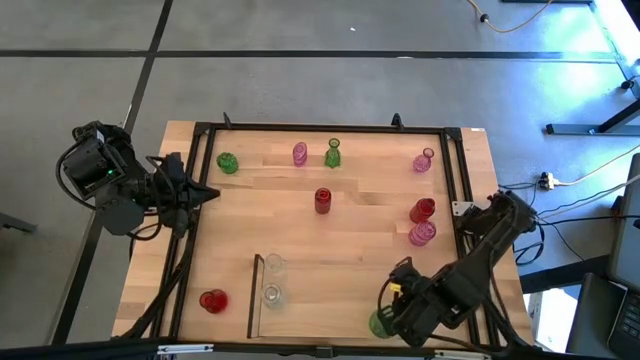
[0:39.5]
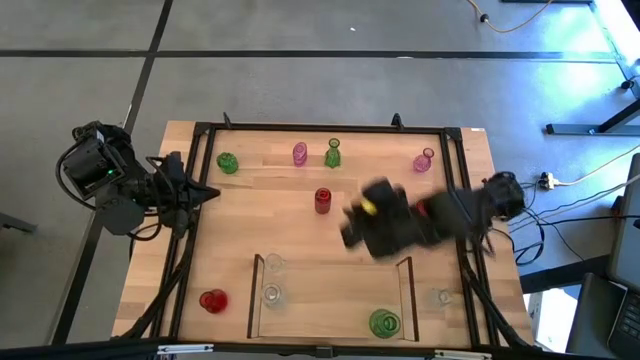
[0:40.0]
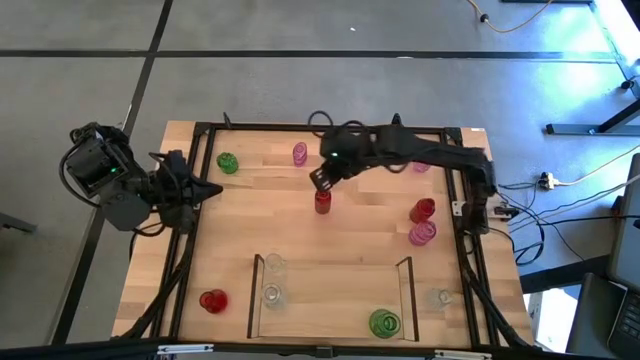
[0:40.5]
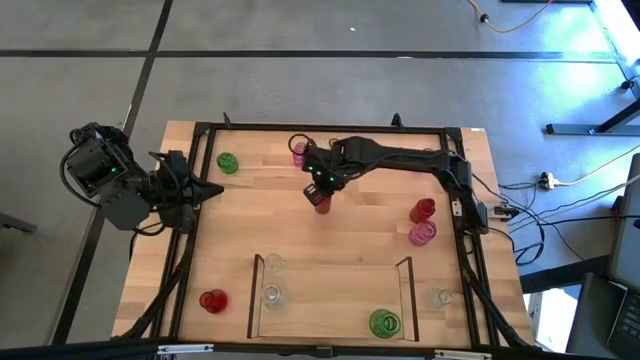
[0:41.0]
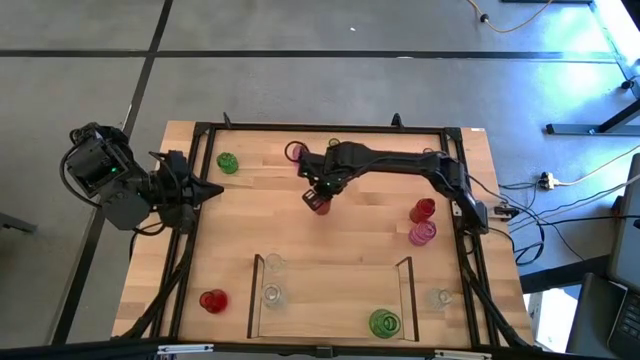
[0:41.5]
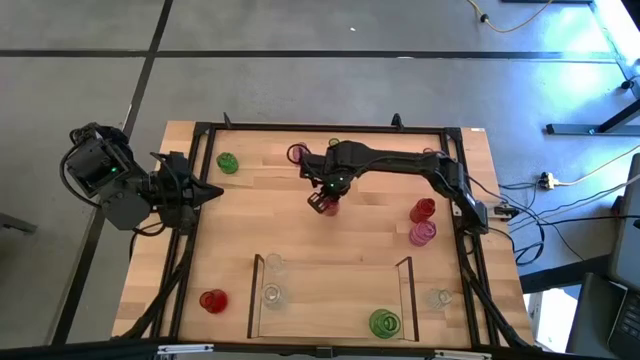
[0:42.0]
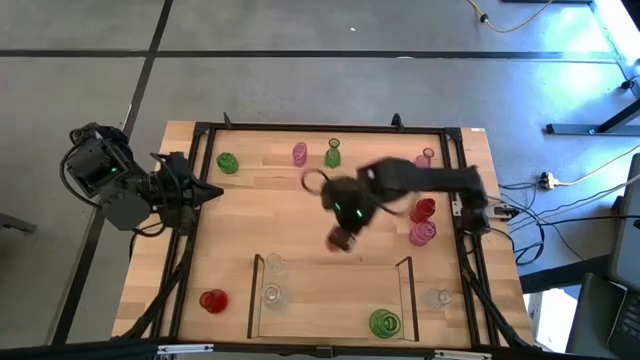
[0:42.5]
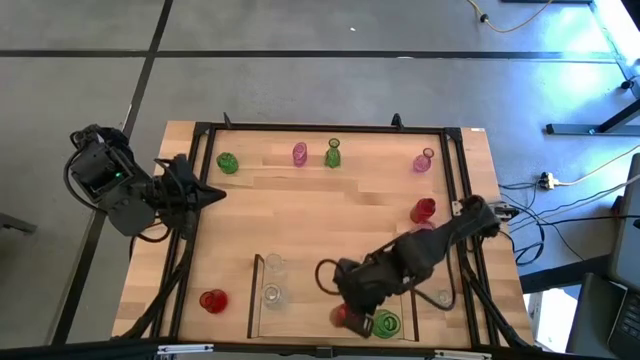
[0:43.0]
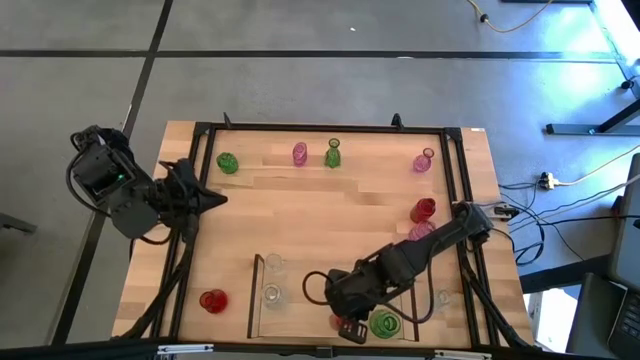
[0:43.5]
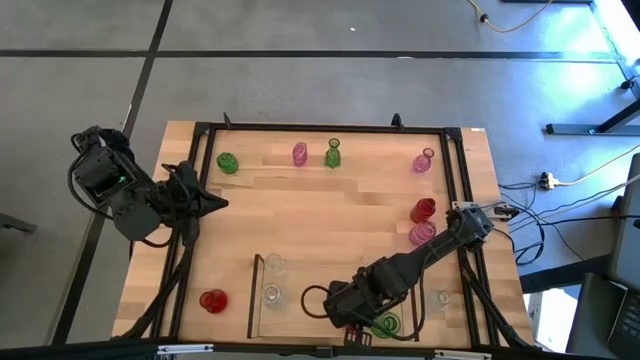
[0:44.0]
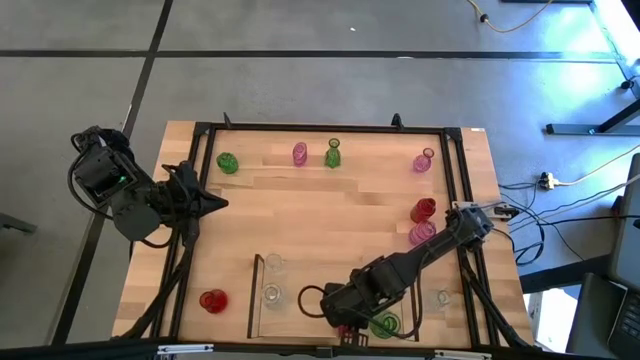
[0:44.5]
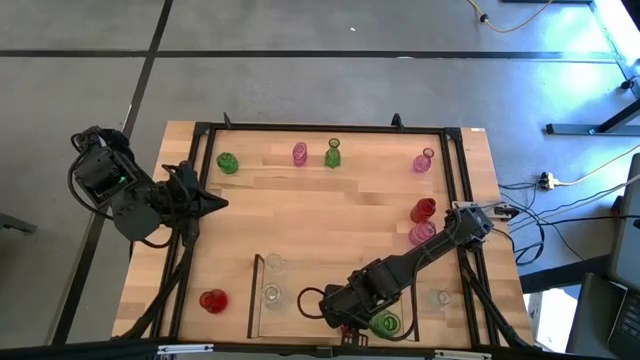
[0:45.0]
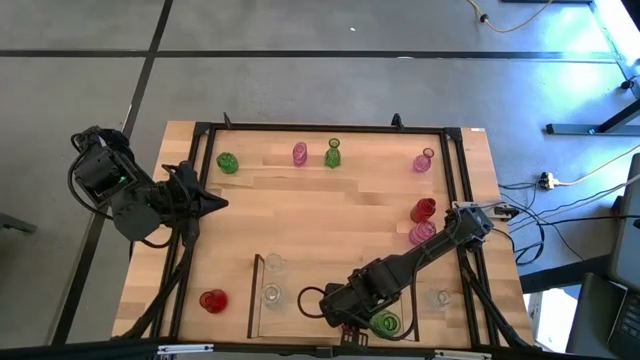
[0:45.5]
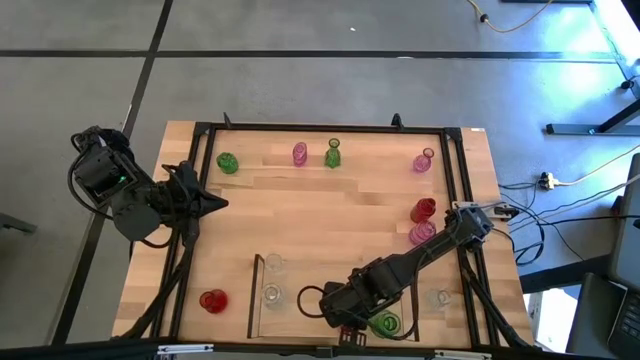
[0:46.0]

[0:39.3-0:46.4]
Task: sort vases onto shelf
Put the middle top red vase on the shelf

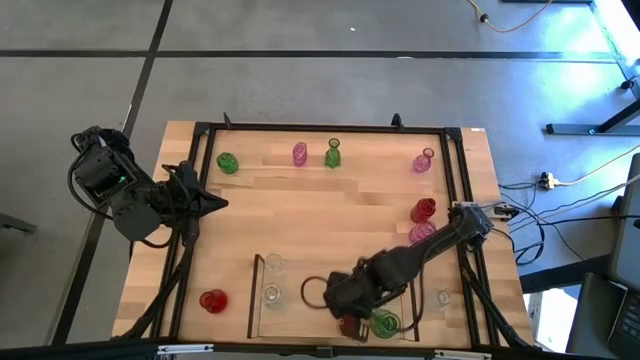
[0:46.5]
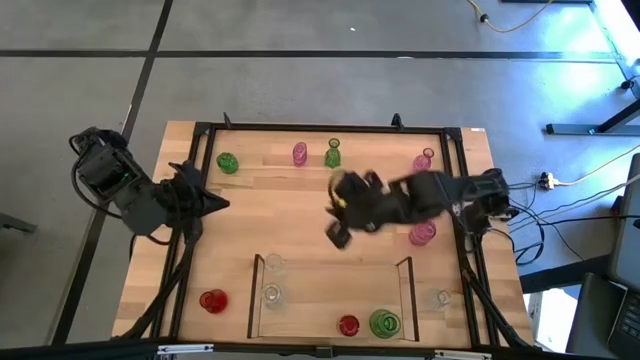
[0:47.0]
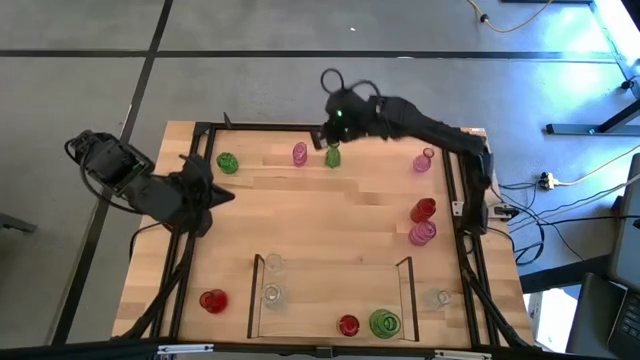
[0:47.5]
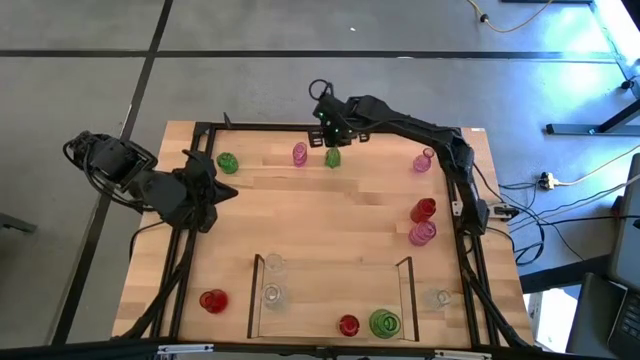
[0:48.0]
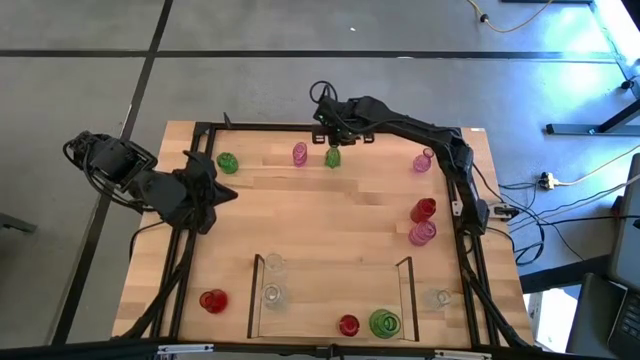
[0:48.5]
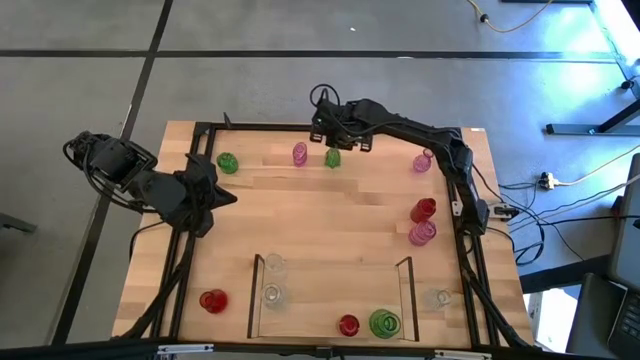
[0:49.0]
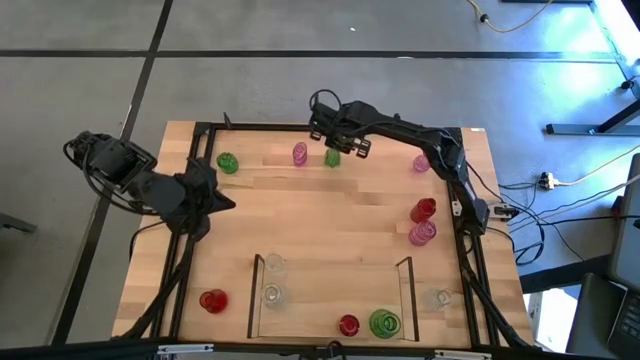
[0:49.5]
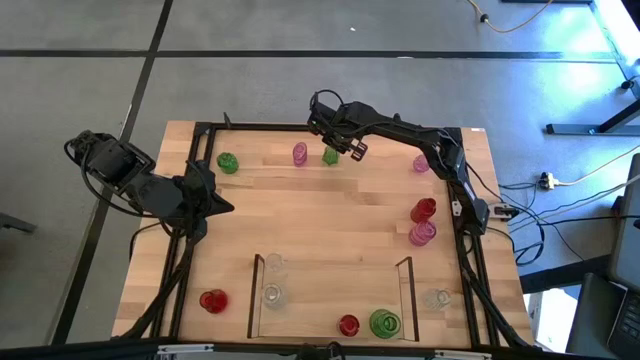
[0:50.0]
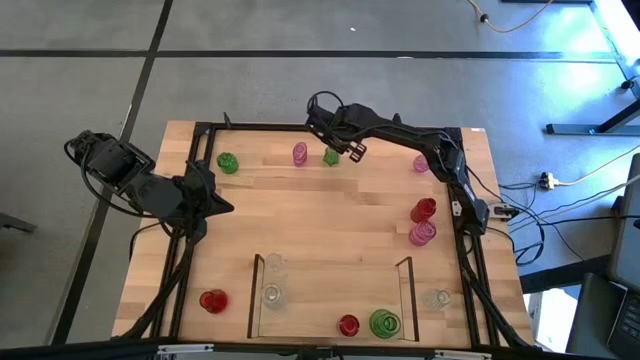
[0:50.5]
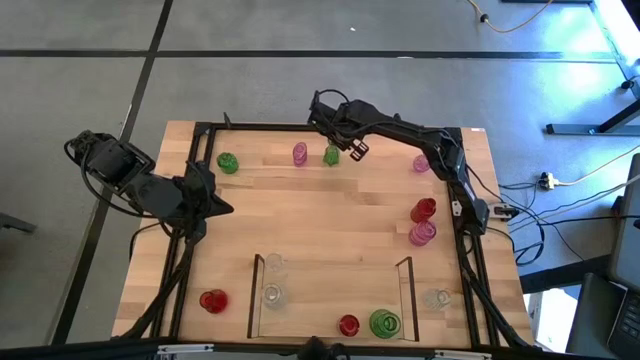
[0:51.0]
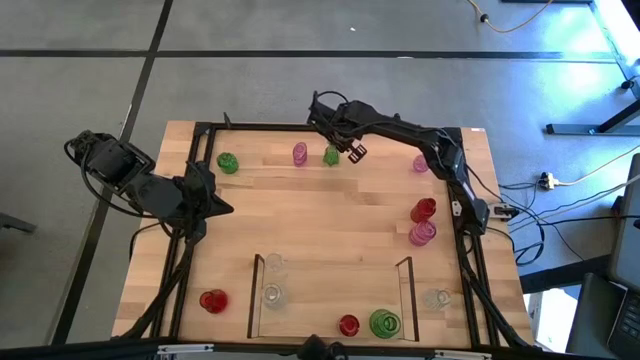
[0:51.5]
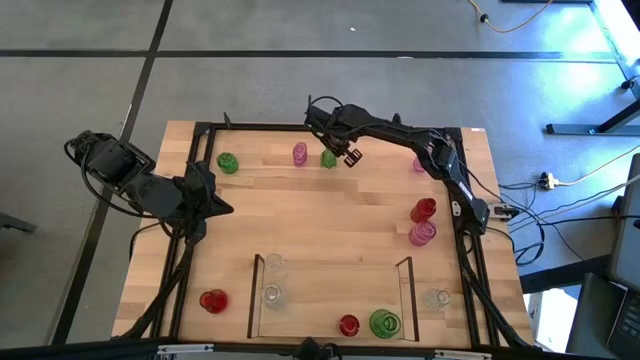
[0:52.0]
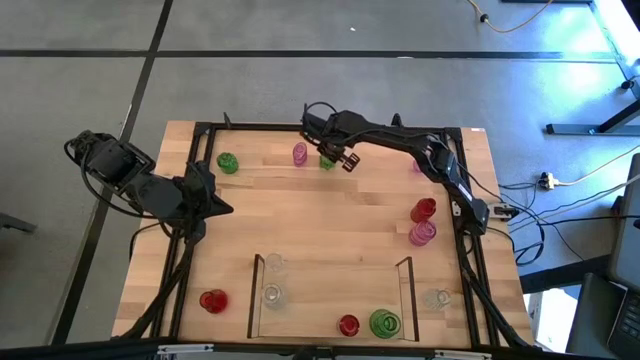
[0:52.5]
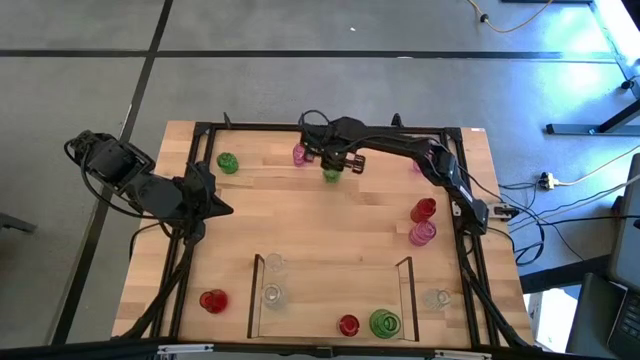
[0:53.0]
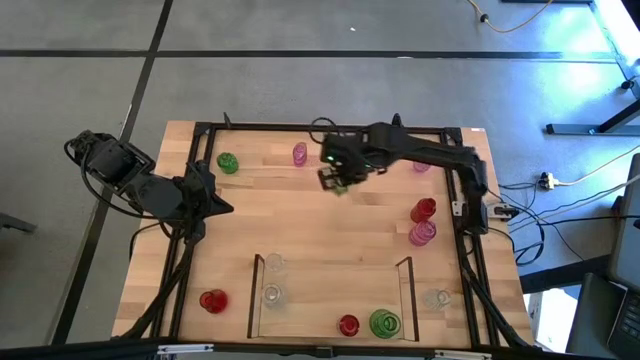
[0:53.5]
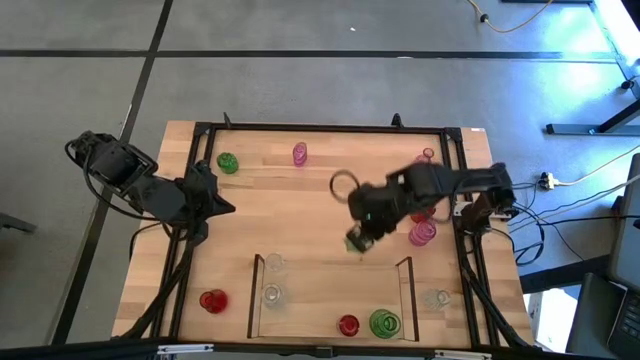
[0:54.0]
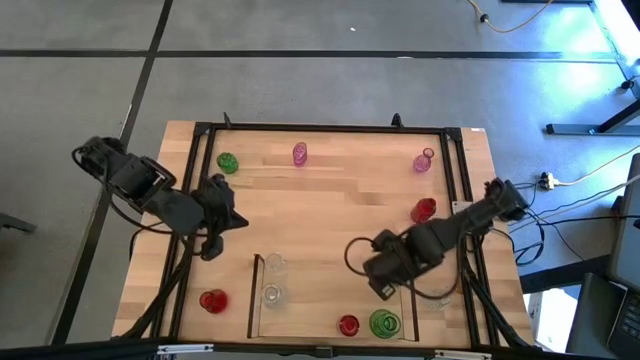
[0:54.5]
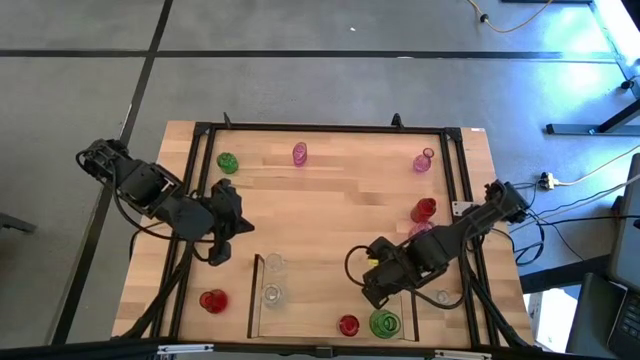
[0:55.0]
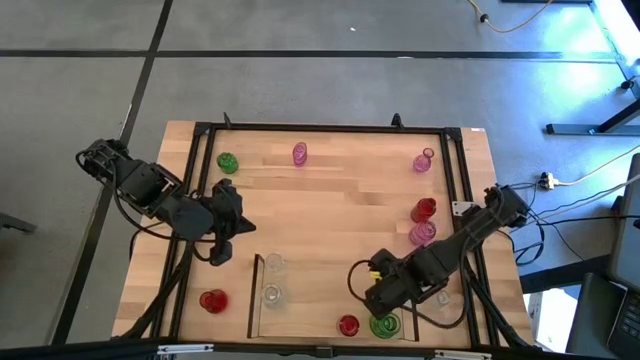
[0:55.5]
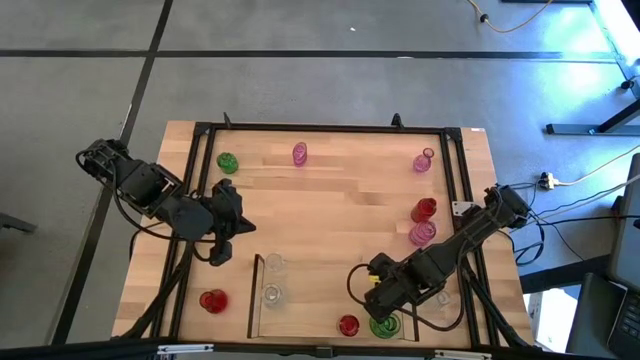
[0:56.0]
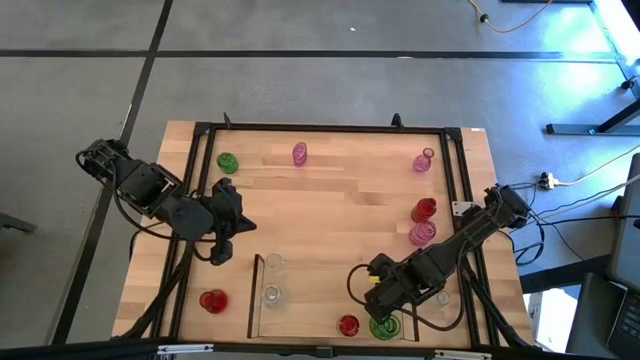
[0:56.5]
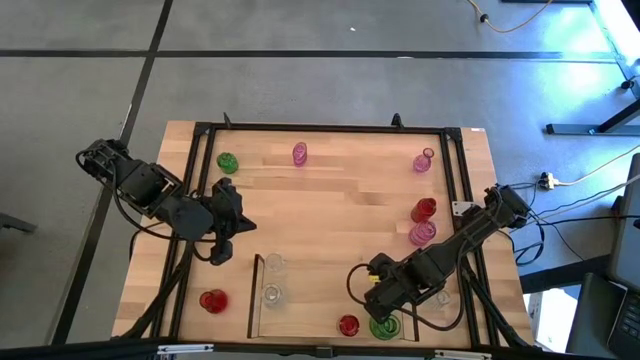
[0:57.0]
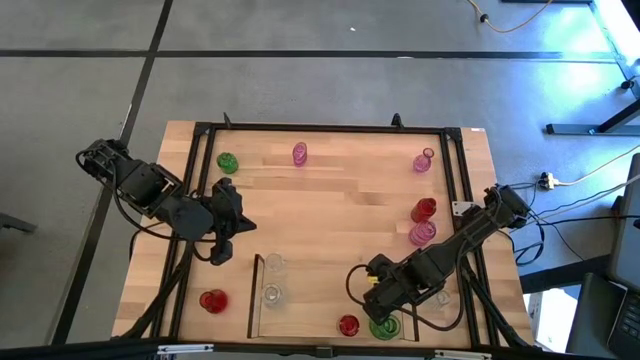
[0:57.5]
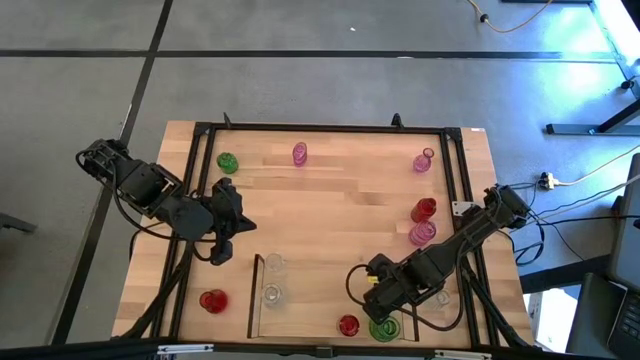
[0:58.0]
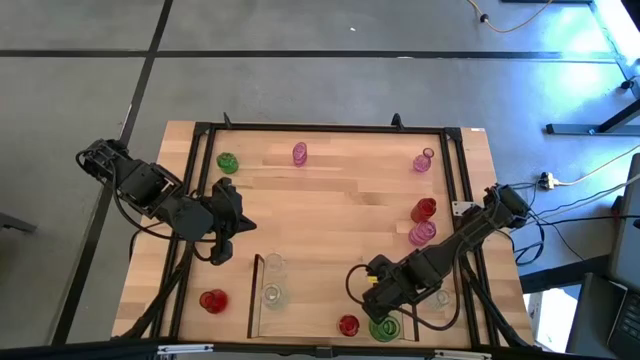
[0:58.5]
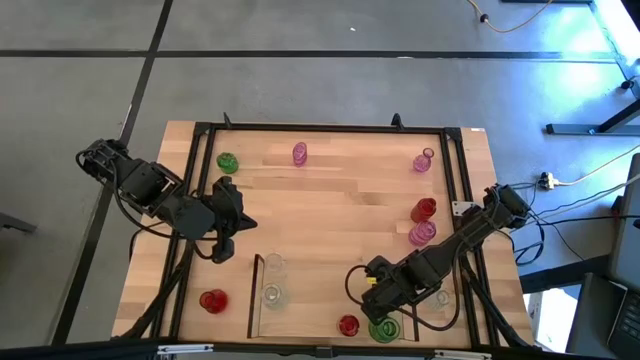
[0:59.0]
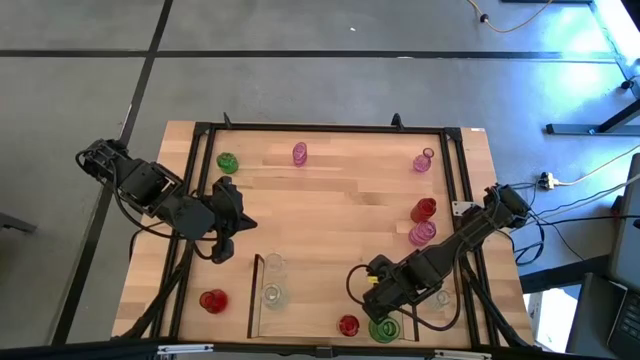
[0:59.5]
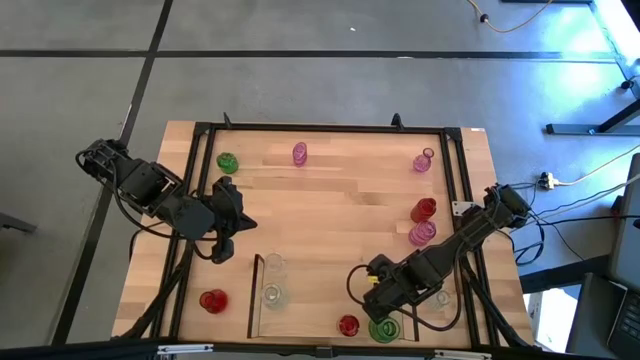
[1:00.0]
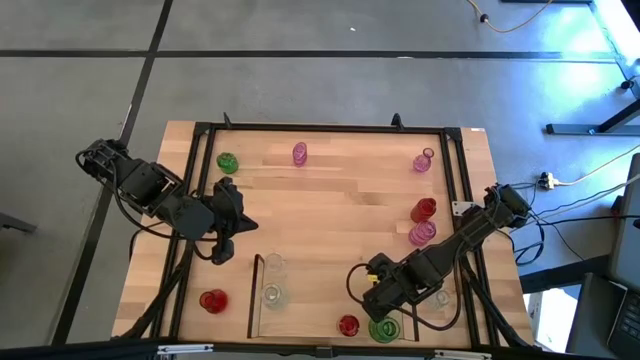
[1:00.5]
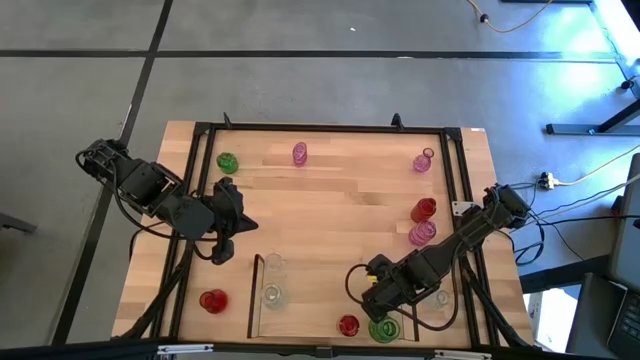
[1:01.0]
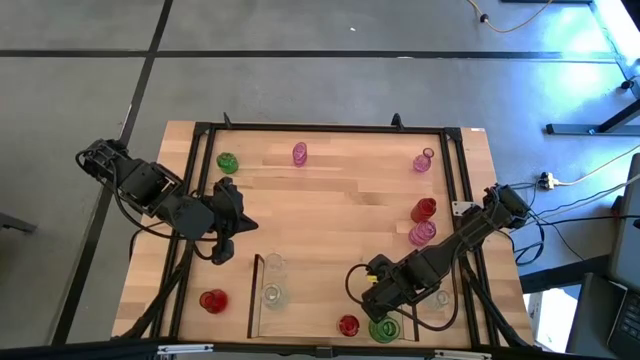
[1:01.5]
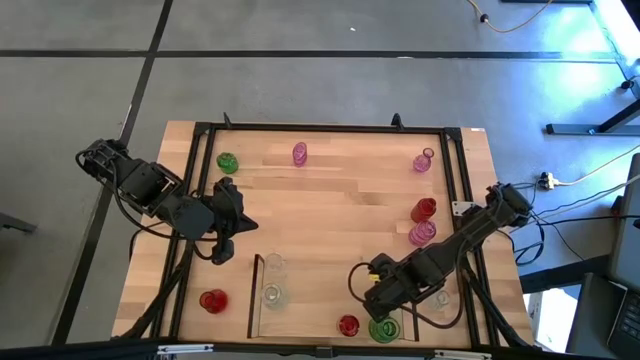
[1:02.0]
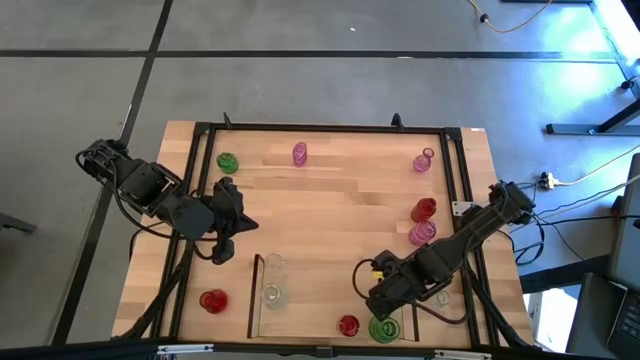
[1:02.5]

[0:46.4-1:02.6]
Put the right green vase aligned with the other green vases on the shelf
